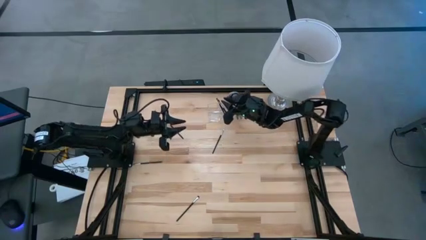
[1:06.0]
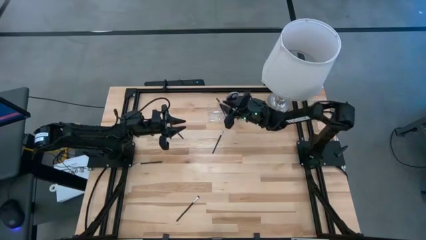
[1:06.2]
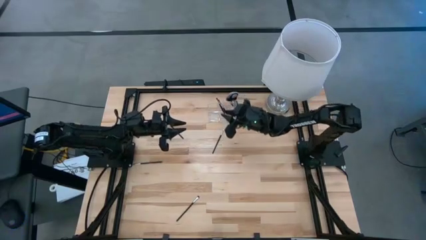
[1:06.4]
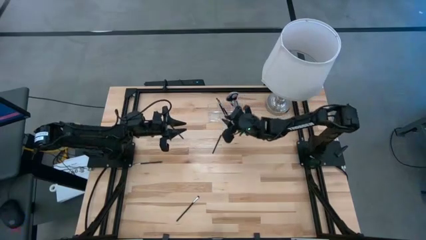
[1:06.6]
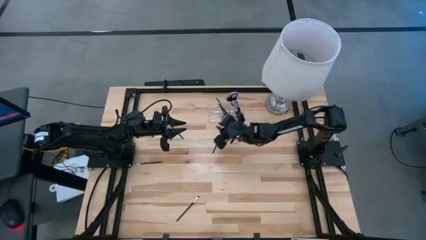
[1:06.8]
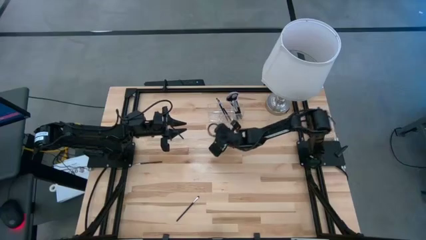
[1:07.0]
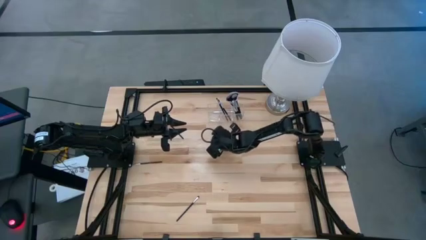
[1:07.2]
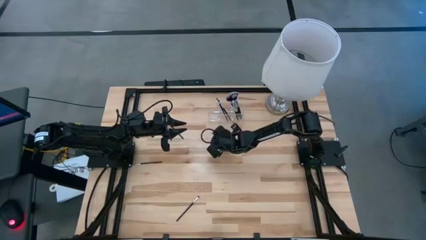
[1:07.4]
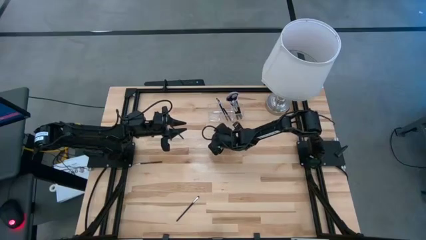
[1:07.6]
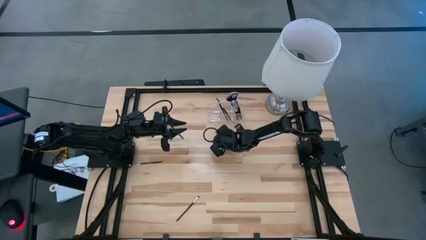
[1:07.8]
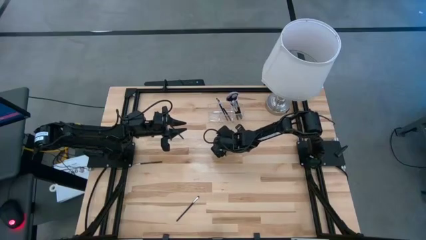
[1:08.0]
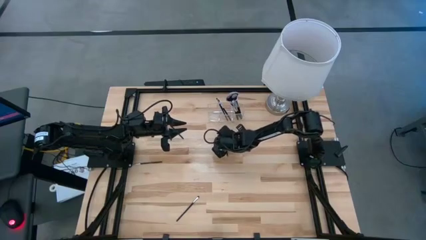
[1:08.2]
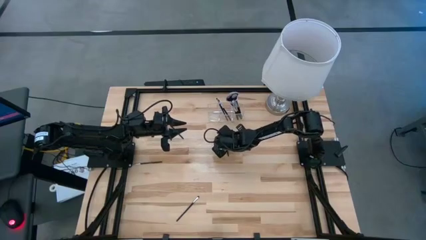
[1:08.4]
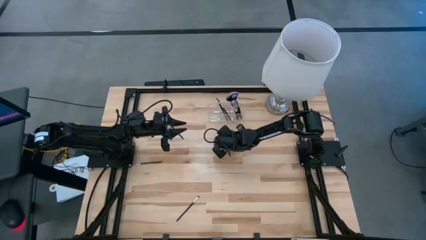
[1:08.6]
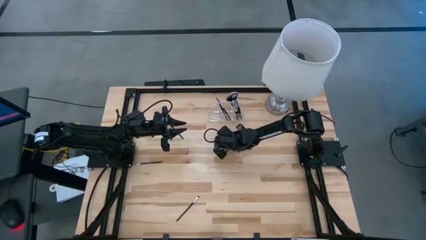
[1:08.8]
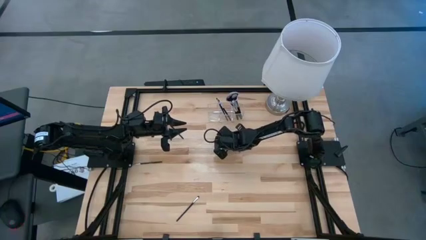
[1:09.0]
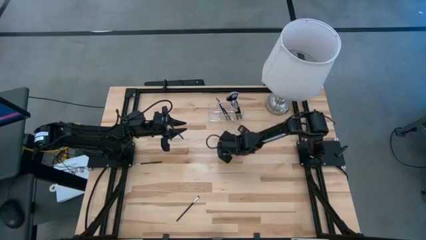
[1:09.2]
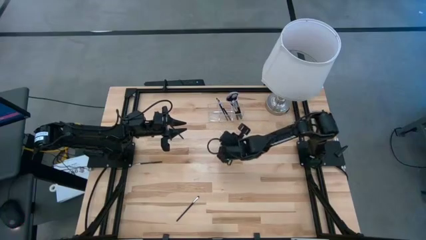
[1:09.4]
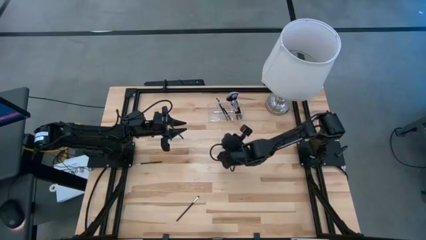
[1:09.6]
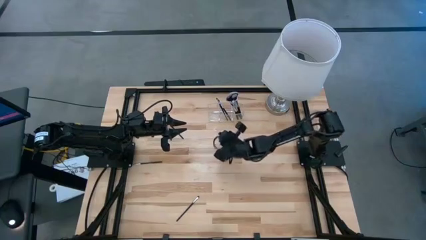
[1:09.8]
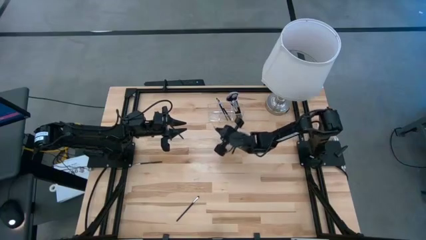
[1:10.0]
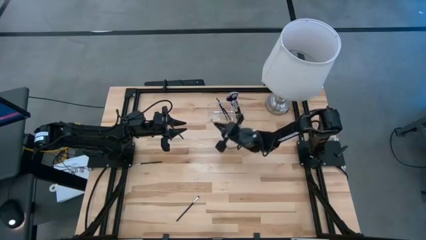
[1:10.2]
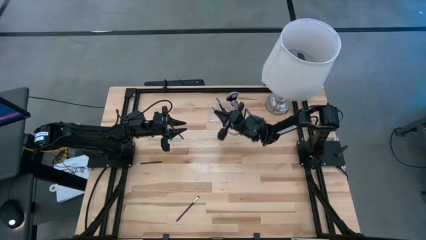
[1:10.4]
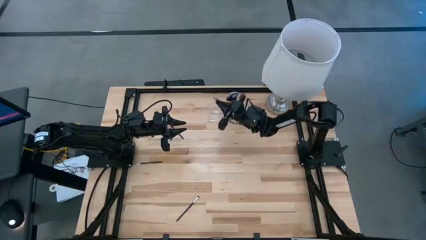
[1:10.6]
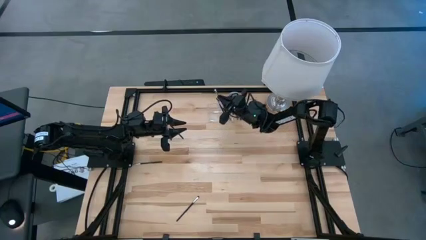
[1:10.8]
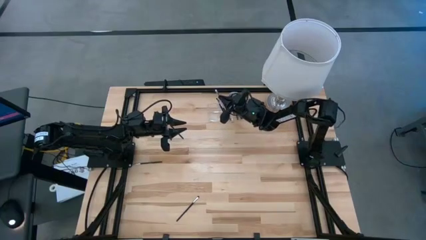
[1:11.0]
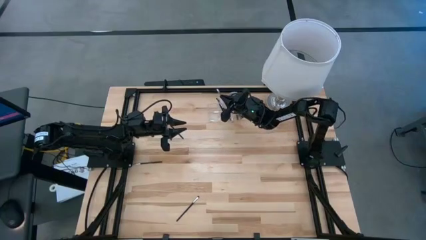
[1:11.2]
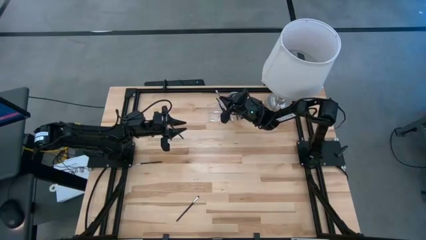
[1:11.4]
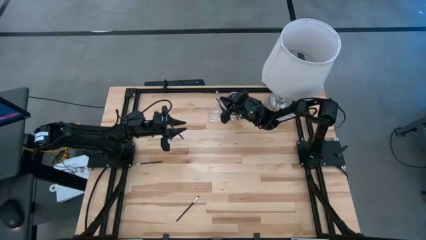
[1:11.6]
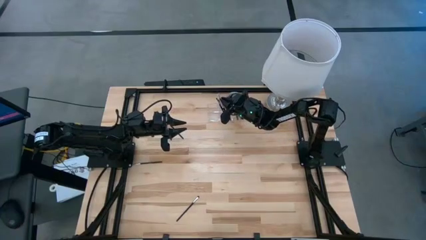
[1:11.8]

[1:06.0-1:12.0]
Task: Put items in baskets/containers
Put the silver and white eyeshadow brush into the transparent organizer

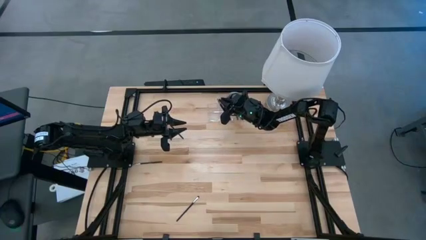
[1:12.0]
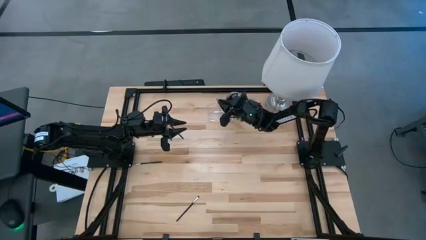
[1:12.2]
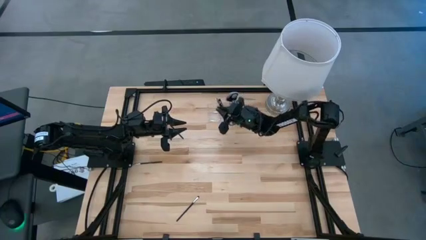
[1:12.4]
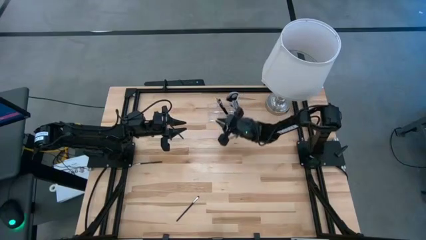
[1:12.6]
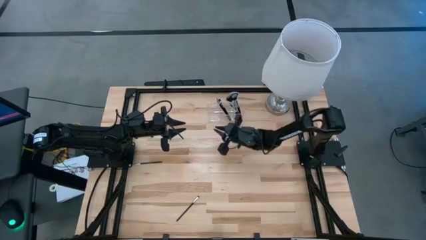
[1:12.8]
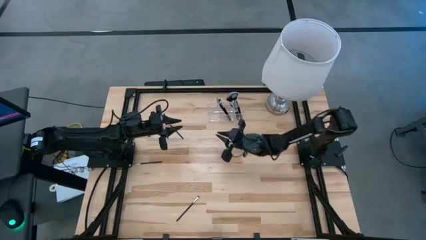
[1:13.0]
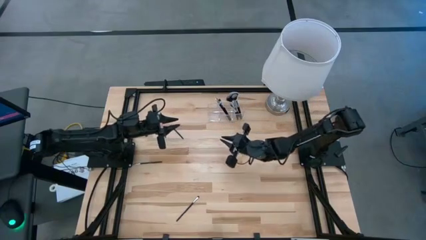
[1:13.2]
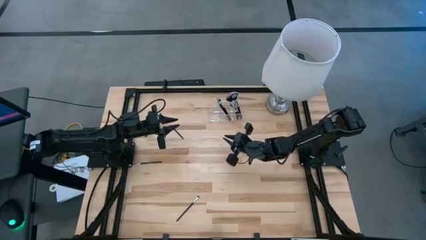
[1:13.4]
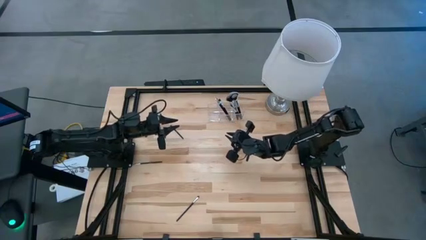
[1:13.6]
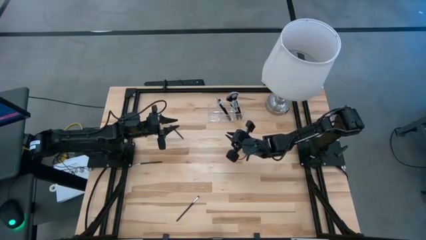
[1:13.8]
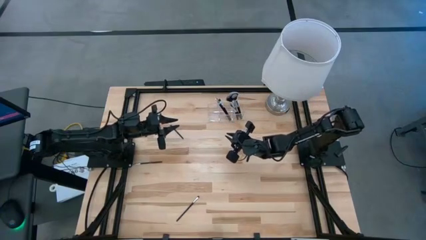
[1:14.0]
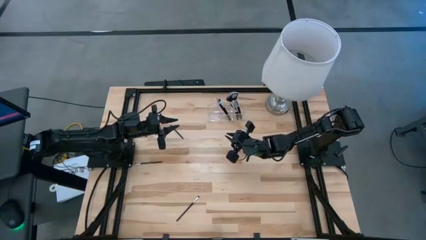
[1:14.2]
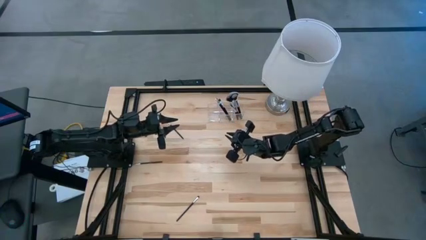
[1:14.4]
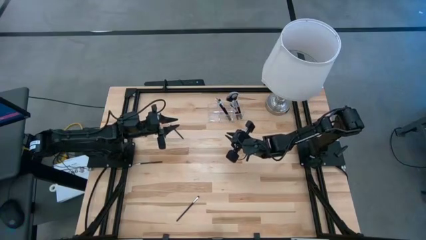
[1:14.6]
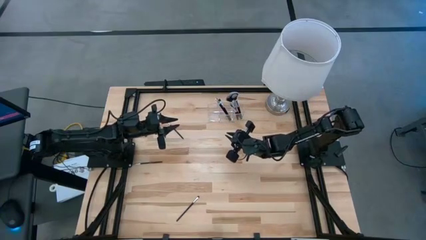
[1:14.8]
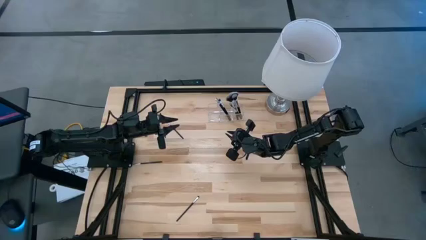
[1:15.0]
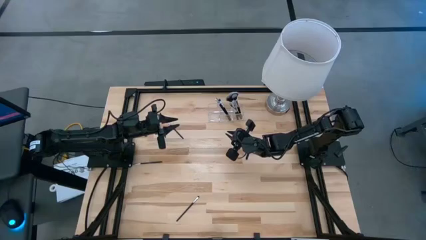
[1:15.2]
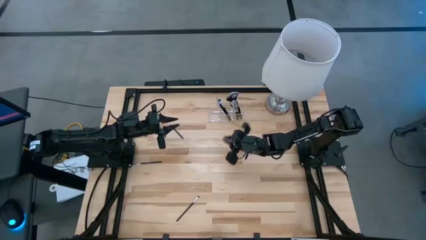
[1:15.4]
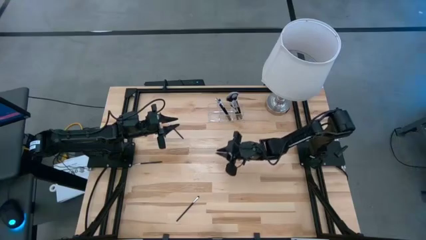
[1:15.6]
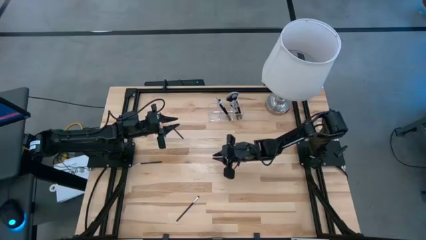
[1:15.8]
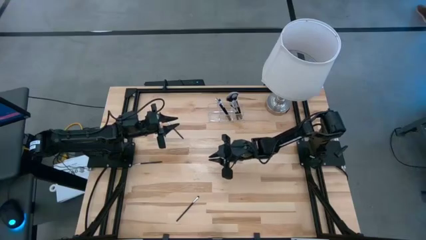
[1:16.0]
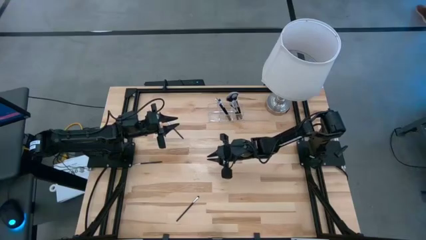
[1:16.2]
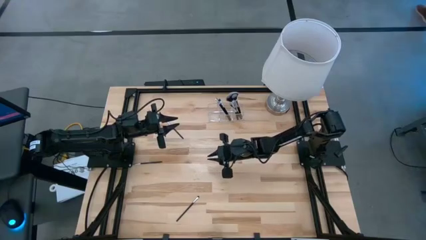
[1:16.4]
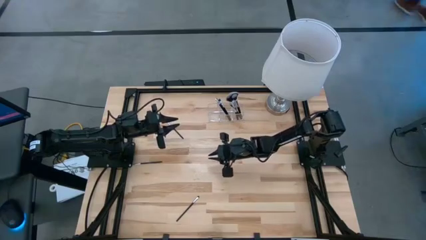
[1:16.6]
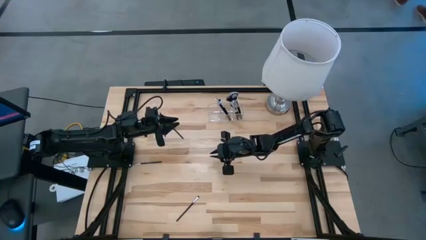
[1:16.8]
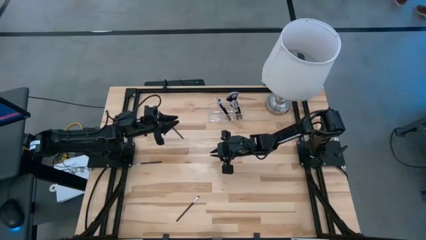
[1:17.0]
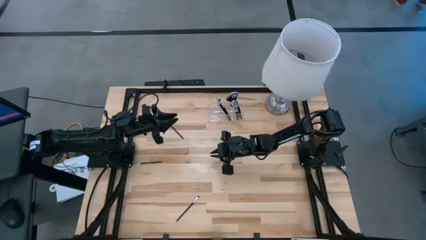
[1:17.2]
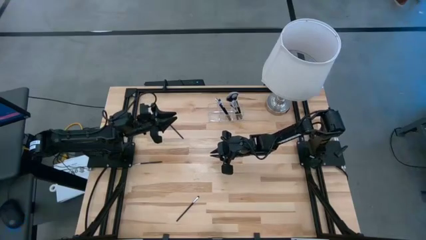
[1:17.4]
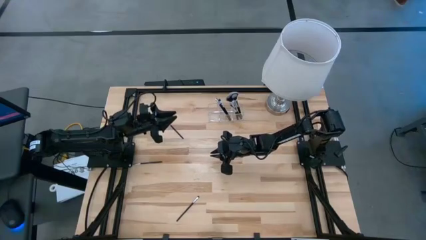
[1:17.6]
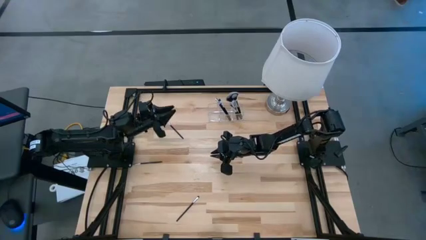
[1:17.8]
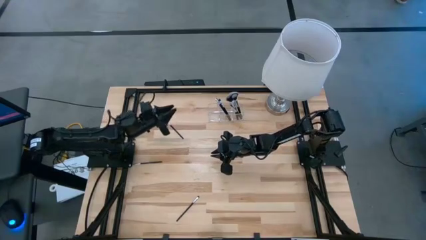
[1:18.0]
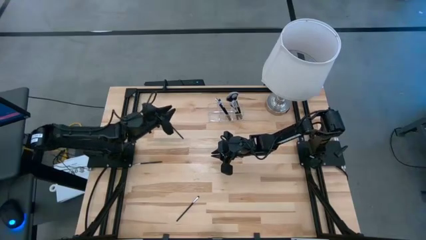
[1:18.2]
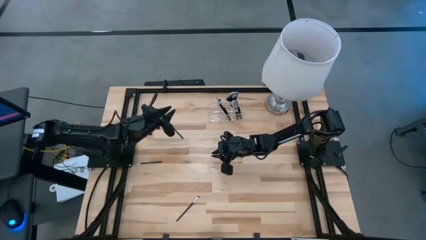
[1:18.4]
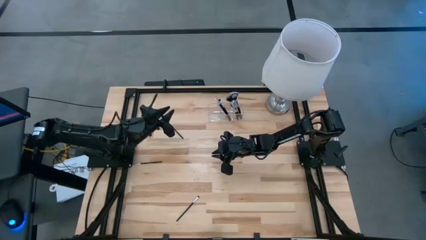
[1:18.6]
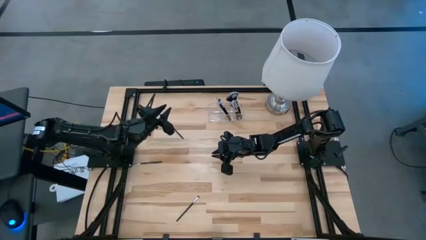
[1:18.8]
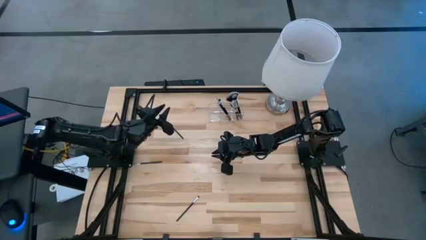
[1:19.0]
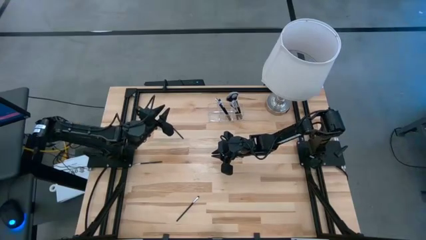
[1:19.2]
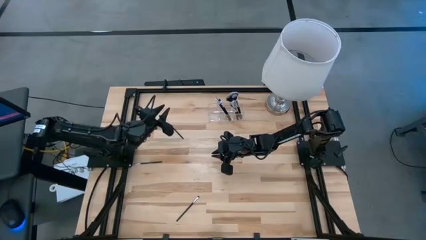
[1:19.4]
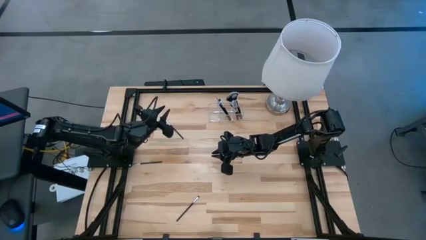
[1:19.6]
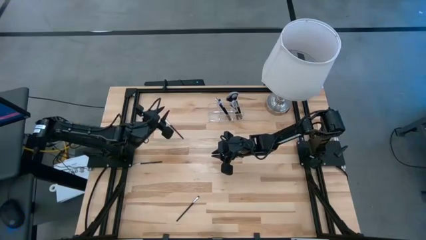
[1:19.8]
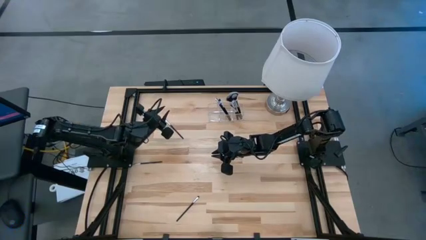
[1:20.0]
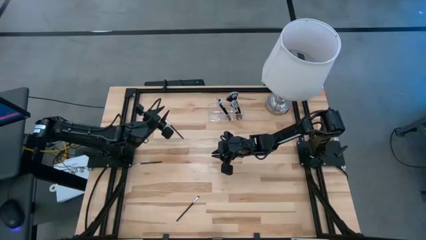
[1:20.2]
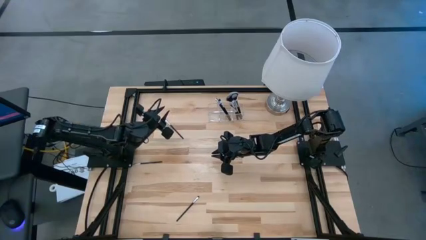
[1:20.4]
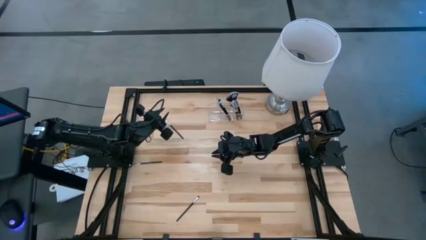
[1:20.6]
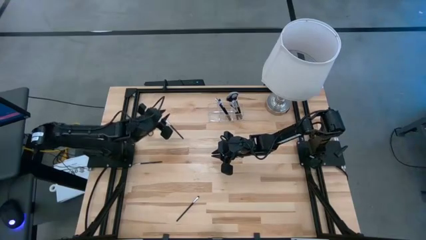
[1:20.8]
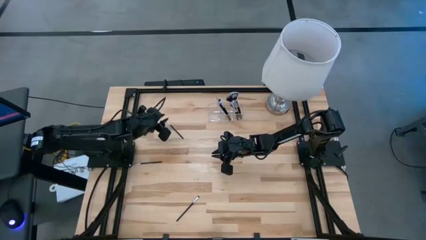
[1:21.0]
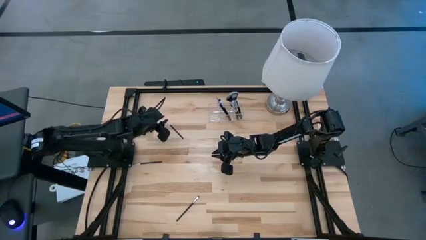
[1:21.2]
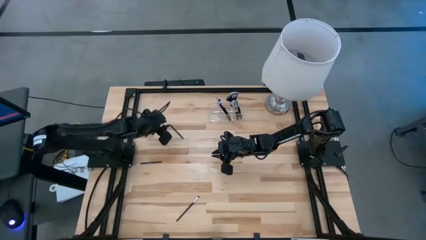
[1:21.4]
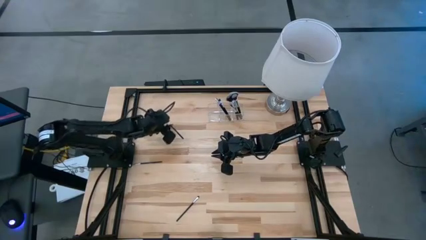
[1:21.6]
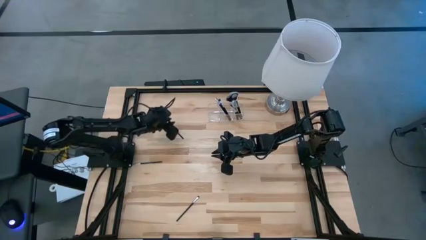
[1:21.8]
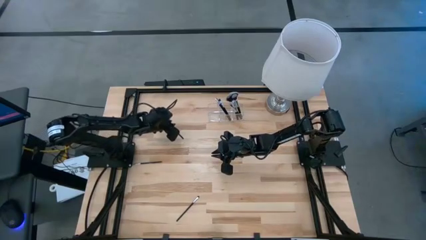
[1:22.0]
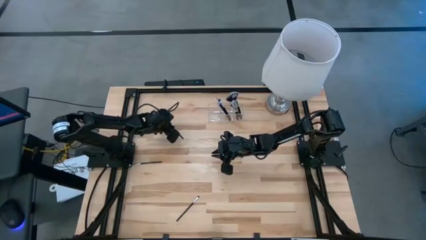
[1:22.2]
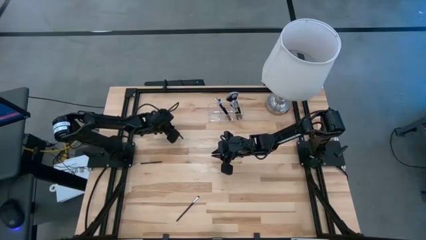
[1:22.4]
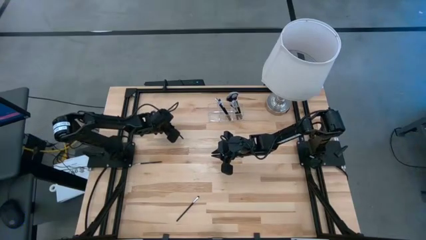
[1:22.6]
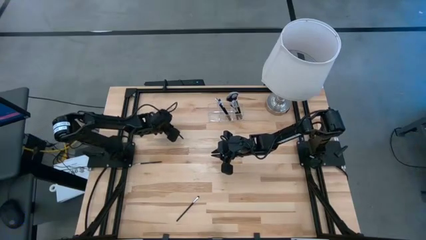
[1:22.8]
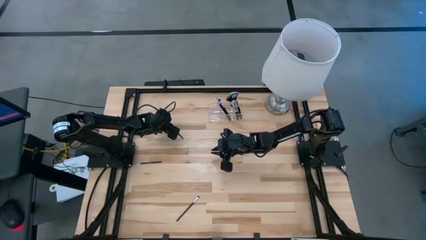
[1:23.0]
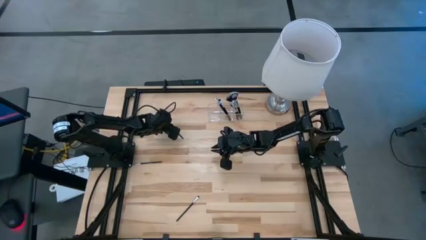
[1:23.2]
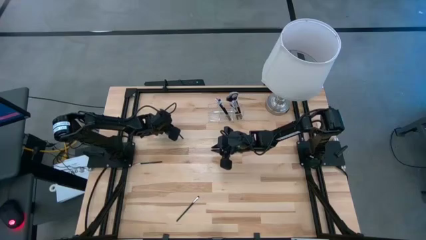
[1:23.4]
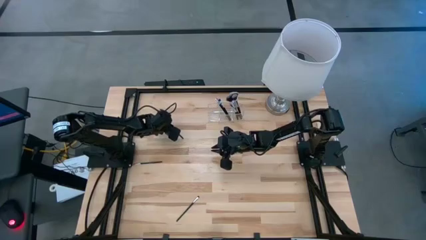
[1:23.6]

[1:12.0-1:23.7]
Put the silver eyeshadow brush into the transparent organizer
